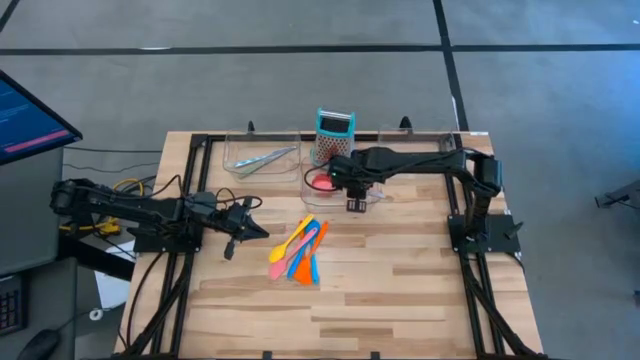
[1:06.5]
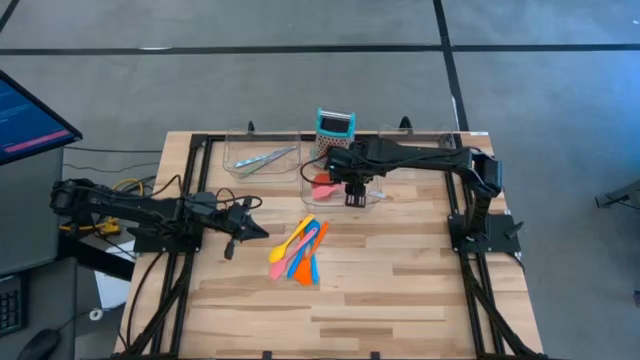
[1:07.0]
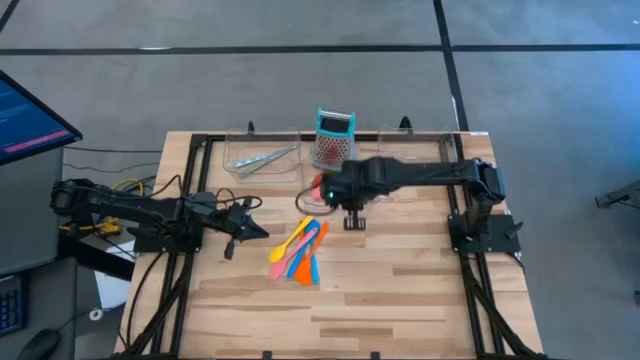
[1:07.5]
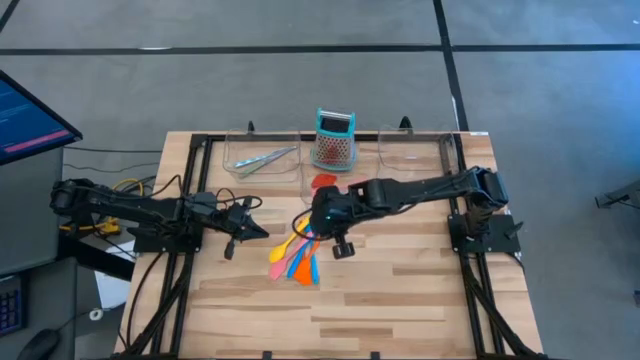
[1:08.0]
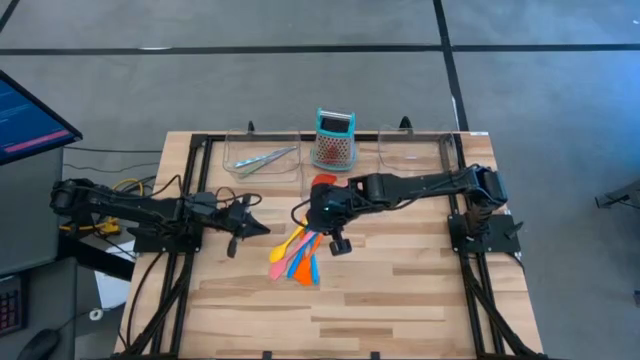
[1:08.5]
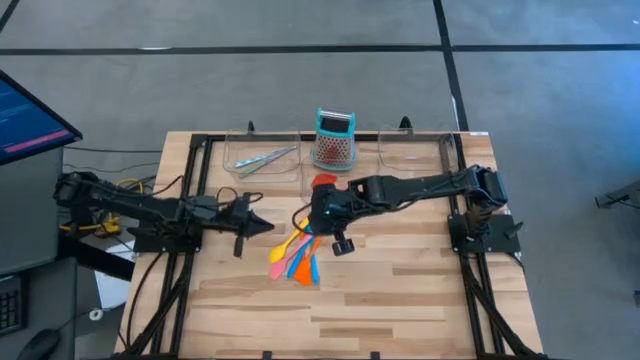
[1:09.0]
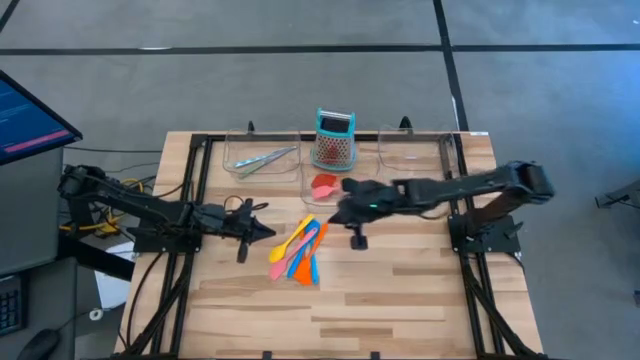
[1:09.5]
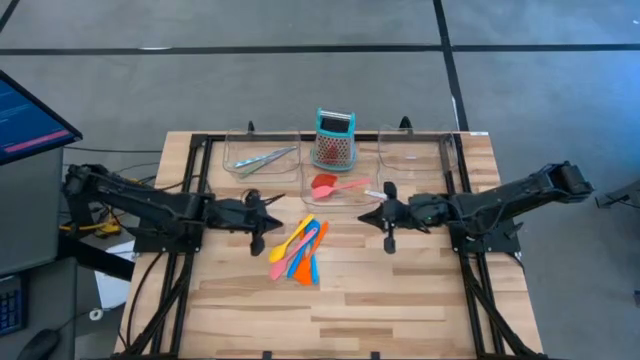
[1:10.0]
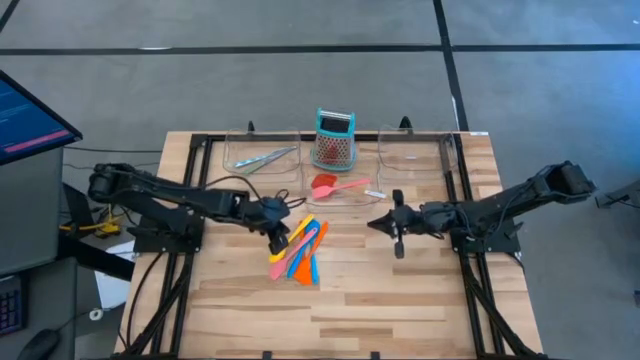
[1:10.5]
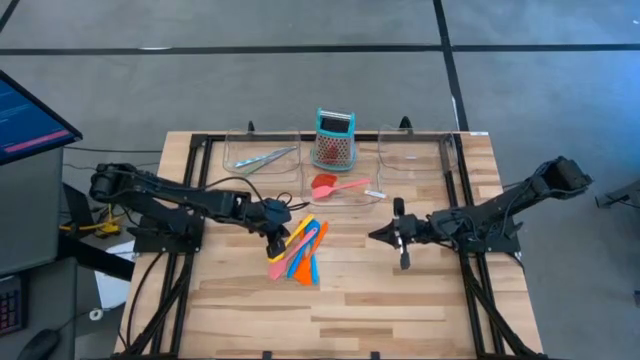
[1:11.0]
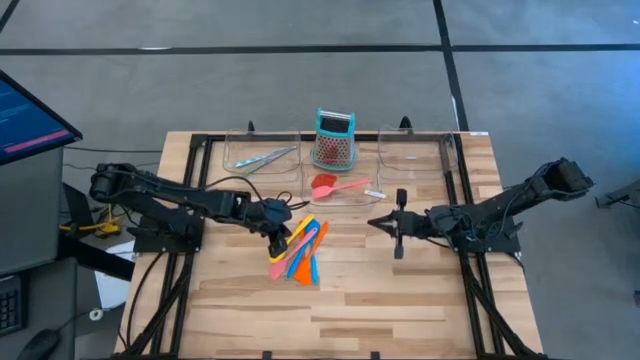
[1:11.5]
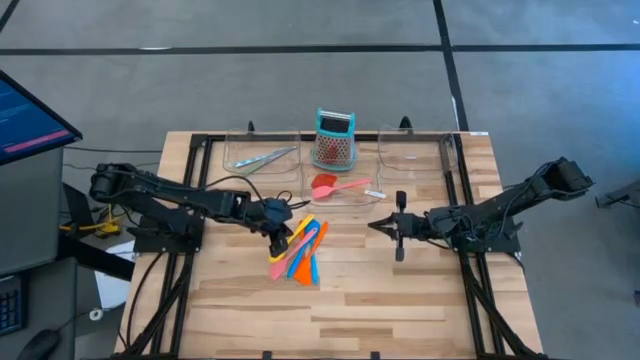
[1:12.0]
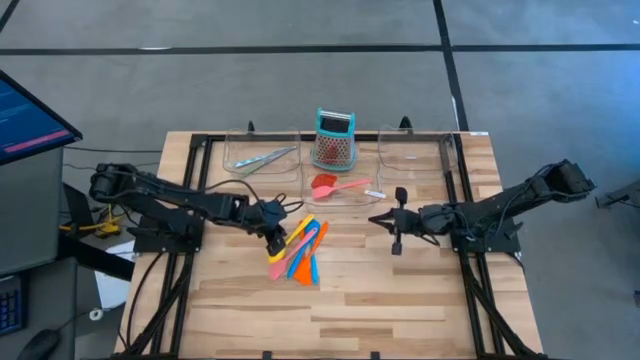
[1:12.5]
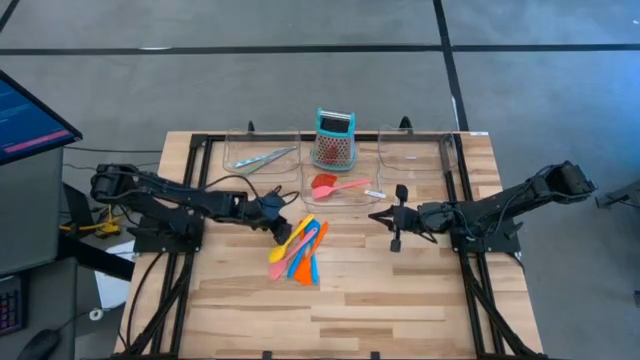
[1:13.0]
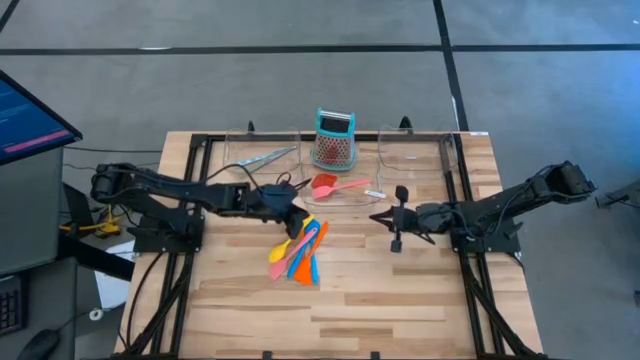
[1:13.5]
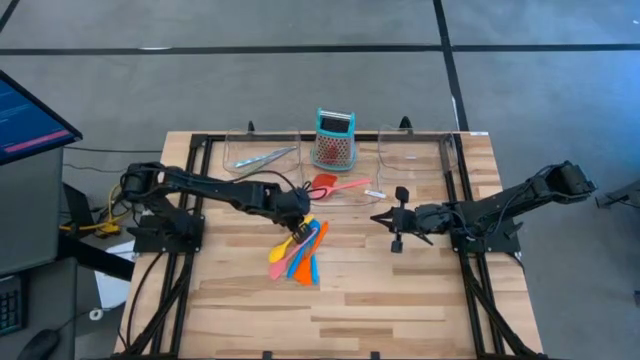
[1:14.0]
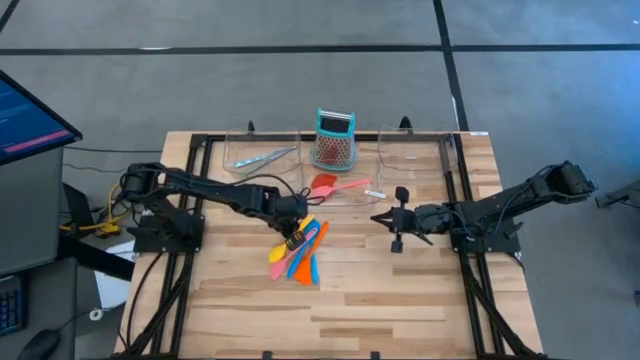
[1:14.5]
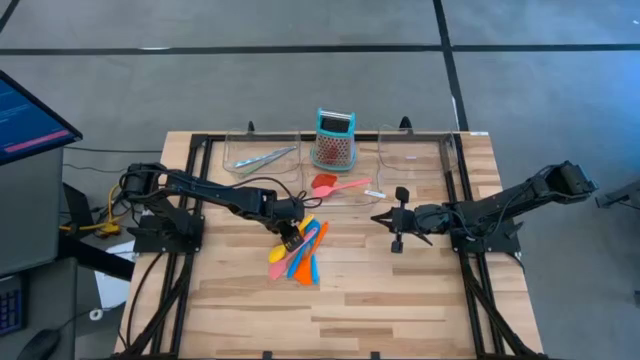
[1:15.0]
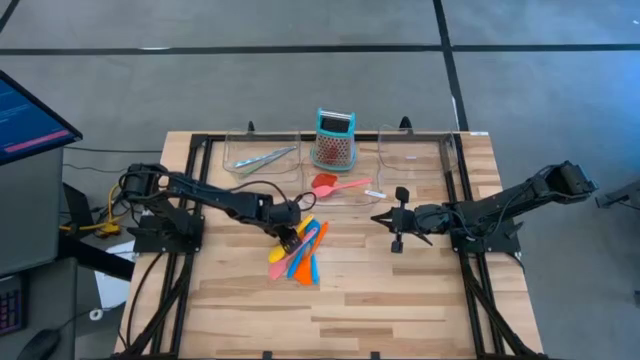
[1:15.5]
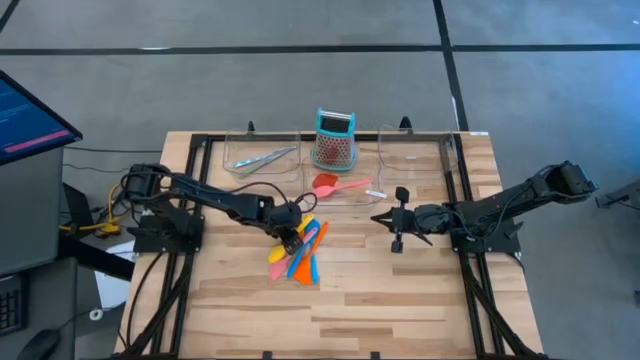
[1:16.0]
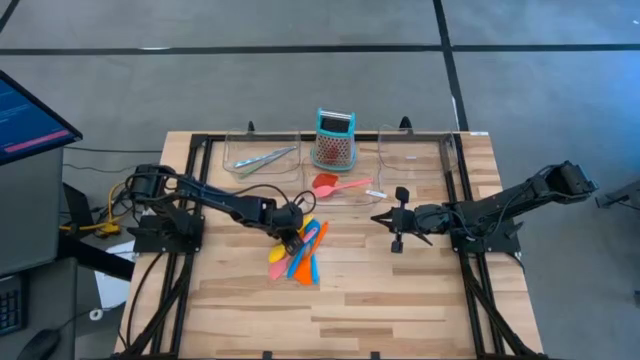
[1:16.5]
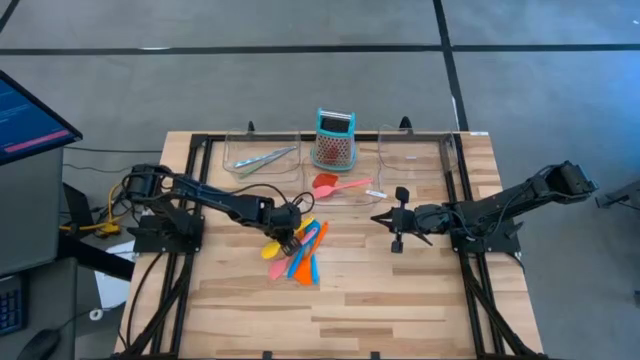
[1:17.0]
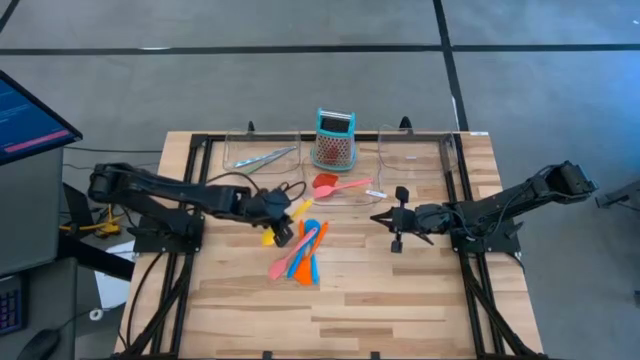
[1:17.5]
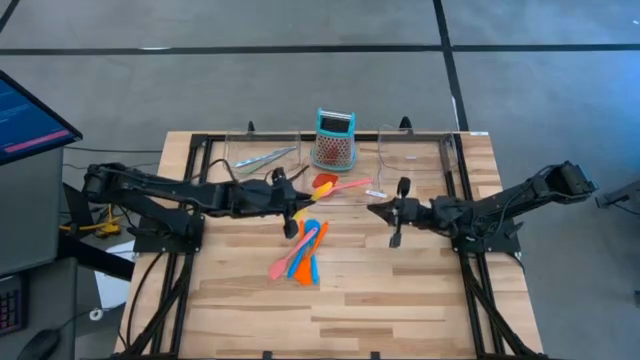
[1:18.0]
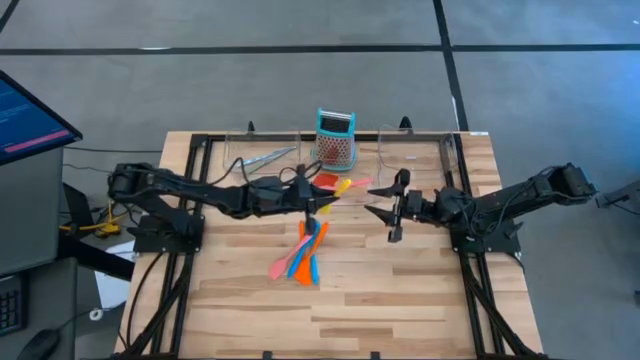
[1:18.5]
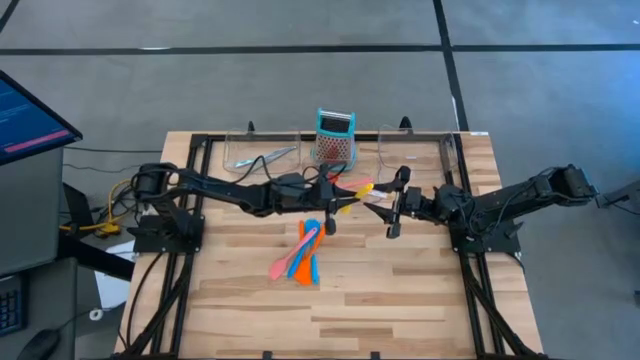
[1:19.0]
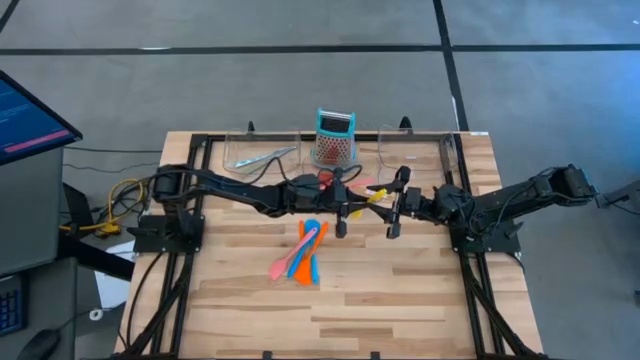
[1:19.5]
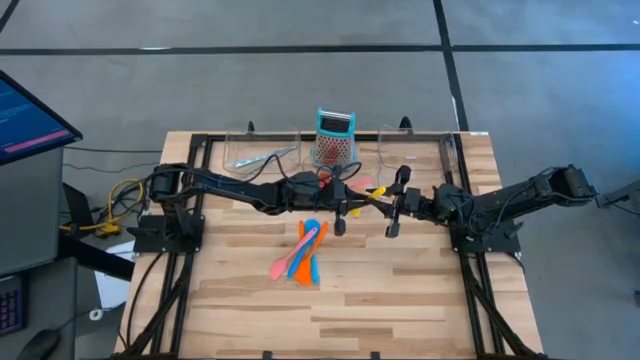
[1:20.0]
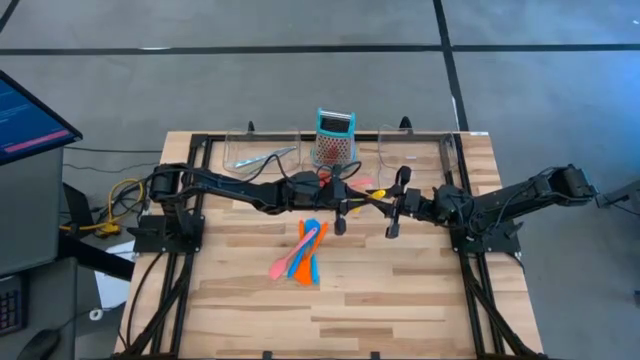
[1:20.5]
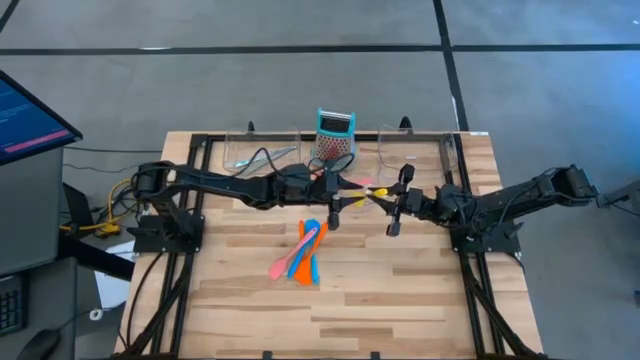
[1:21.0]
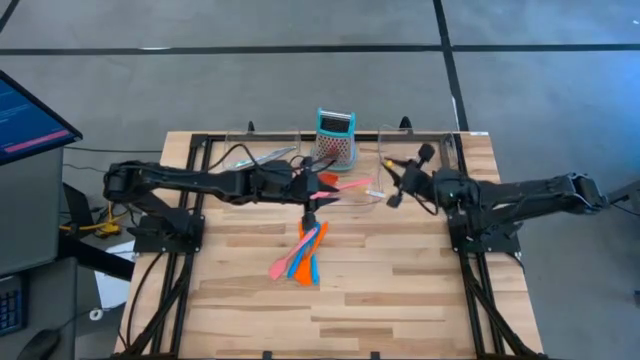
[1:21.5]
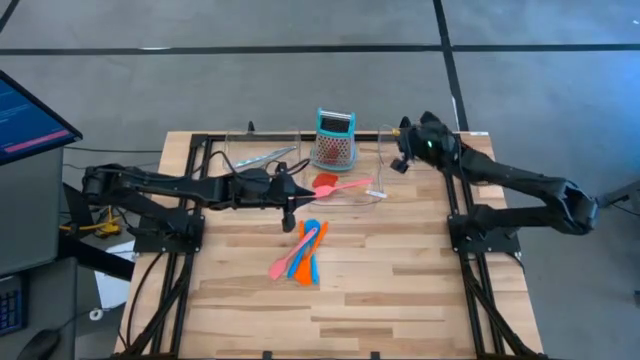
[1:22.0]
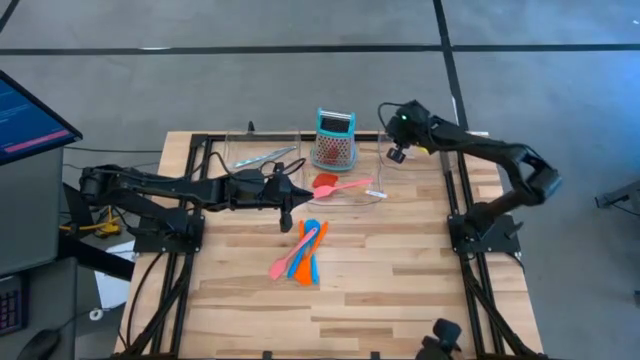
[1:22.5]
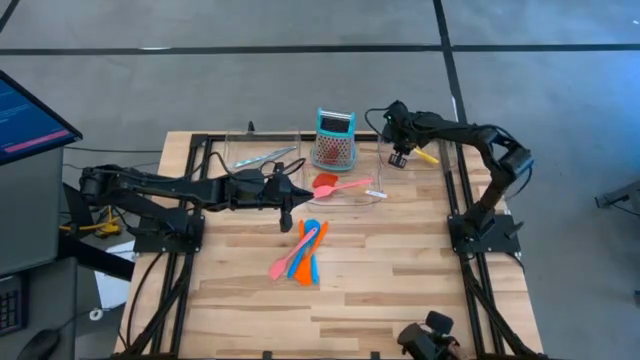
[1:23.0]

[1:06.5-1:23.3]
Task: Pick & Place Kitchen Items
Put the yellow serving spoon into the right transparent bin

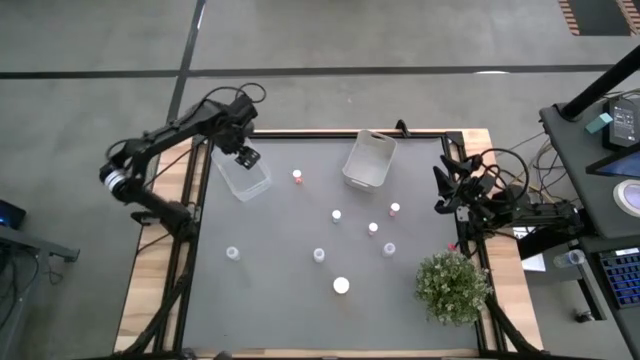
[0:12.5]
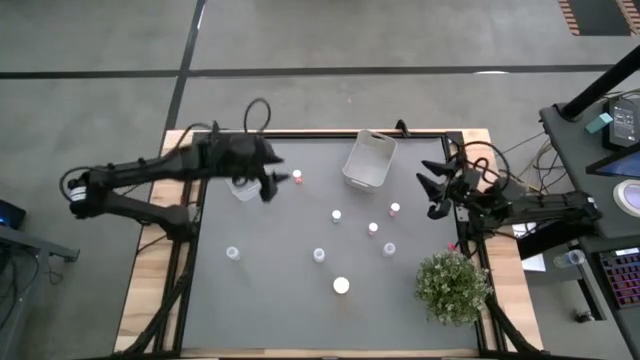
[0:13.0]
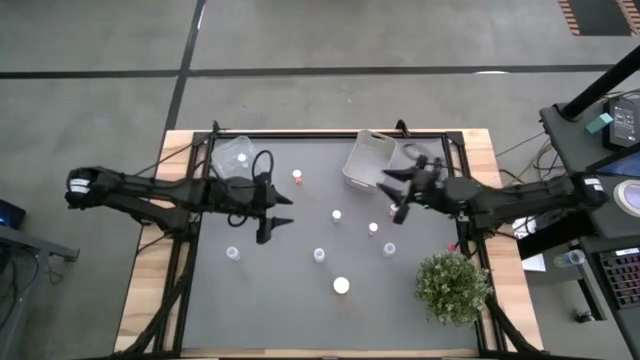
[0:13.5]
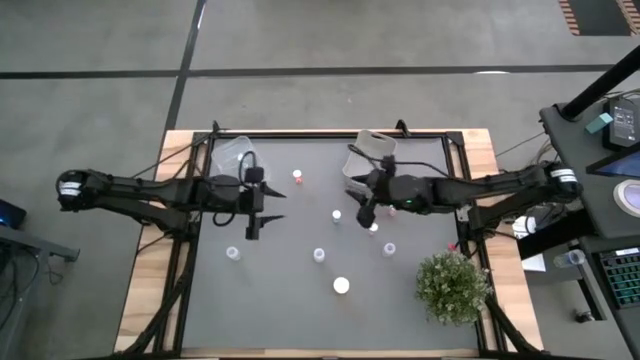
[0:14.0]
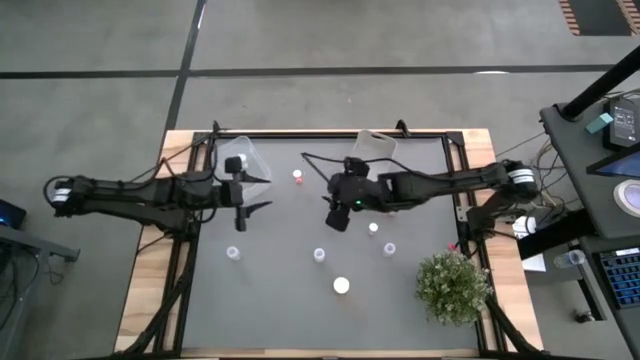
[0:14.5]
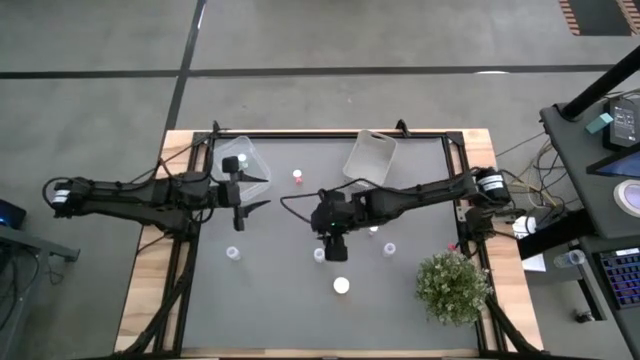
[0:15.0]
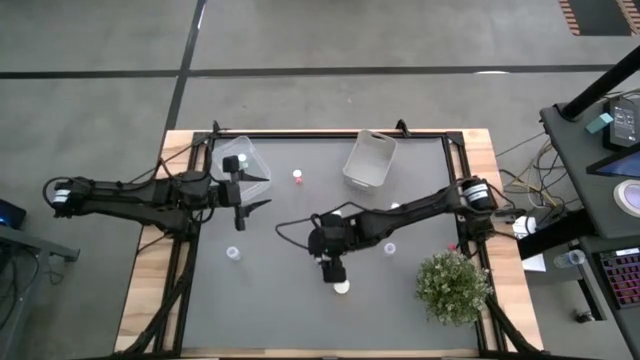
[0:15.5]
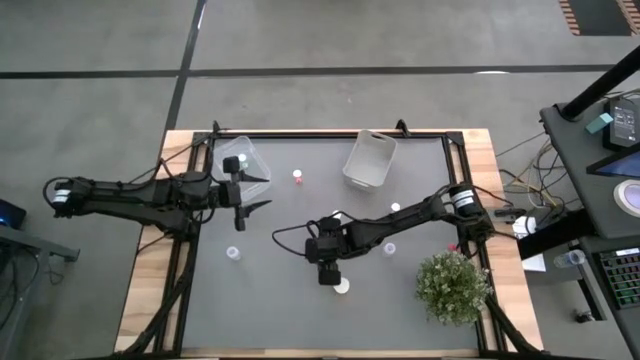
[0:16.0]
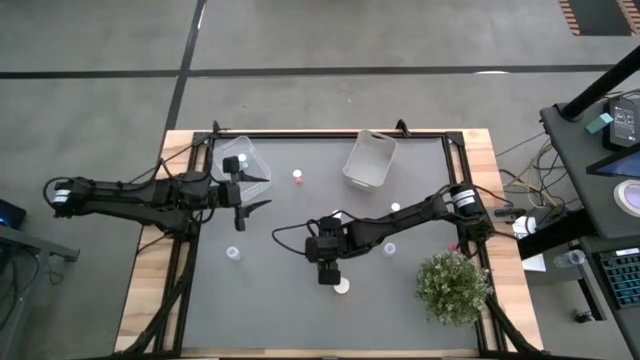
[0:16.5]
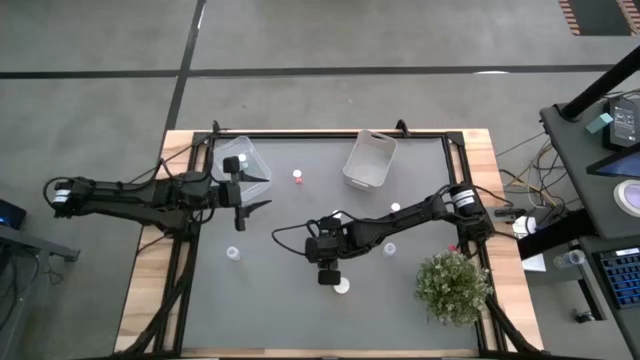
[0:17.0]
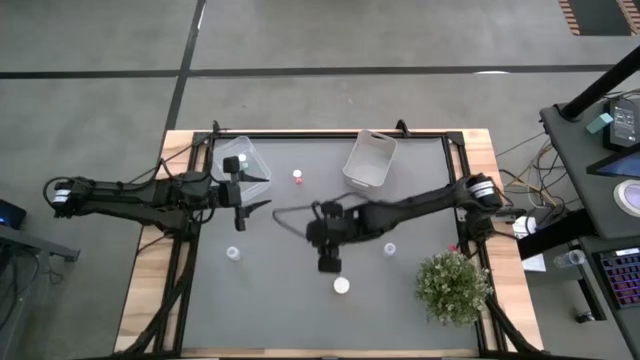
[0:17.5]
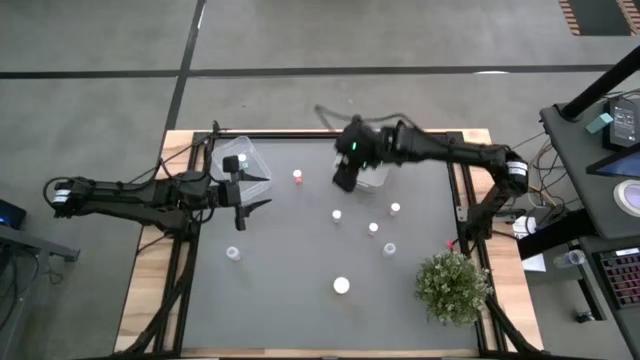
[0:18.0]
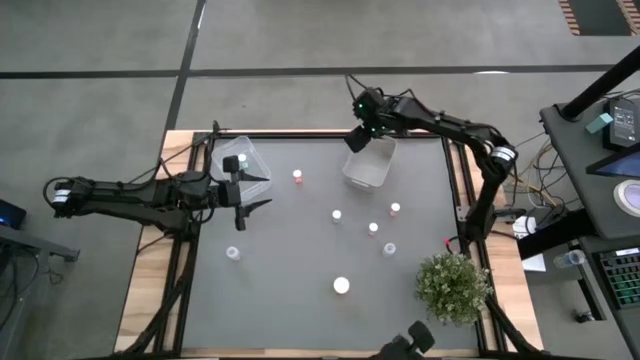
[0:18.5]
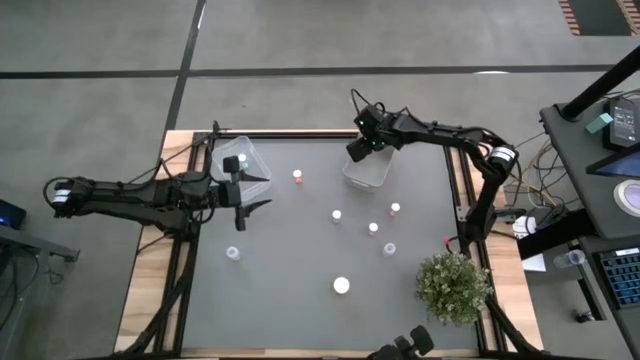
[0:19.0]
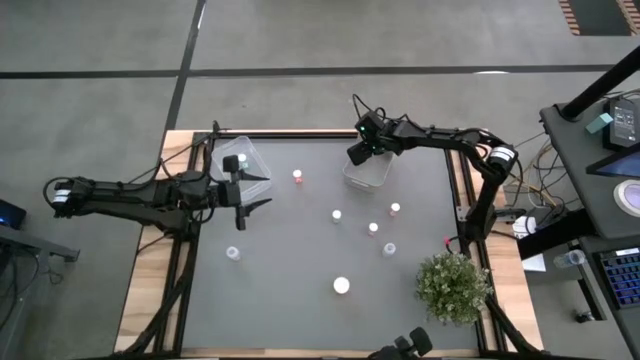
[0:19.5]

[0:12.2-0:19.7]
Task: Pick and place medicine bottles into bin by pill shape (circle, oval)
Put the white middle pill bottle into the gray bin
